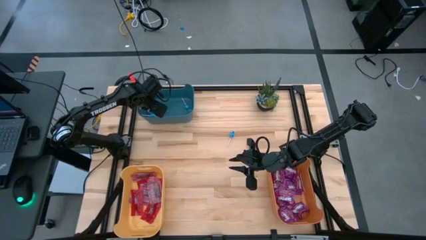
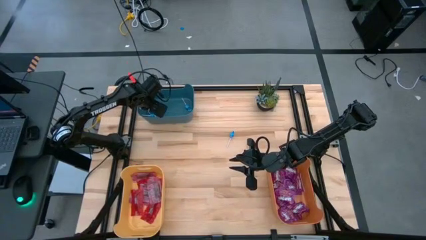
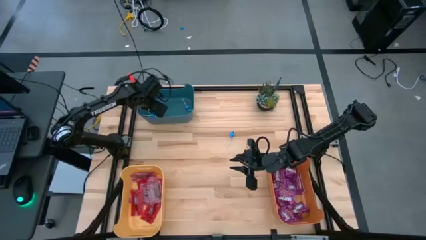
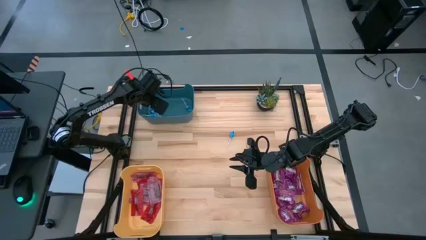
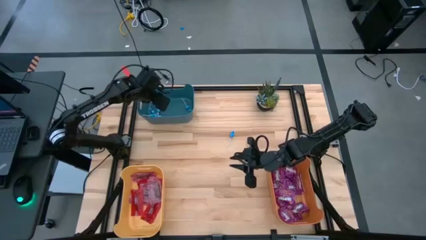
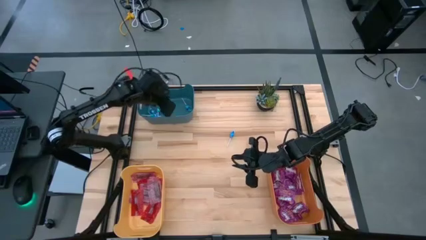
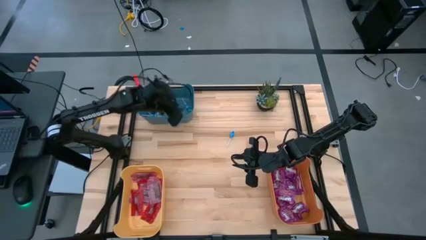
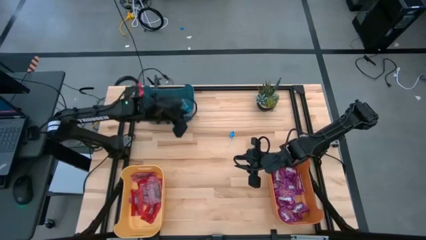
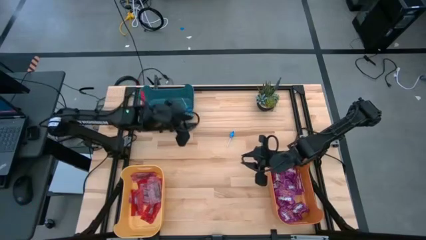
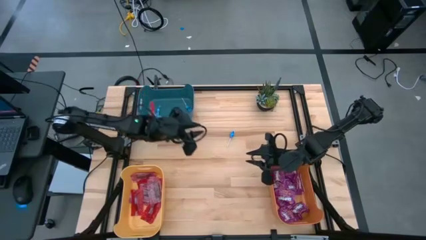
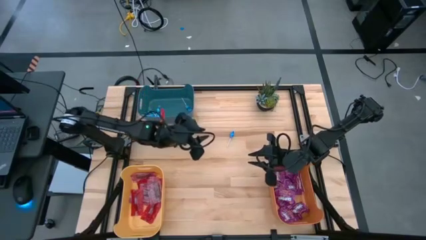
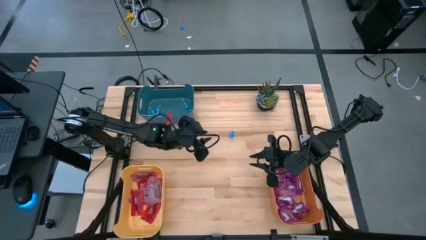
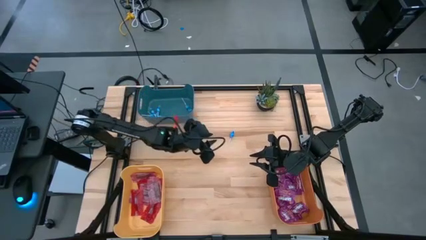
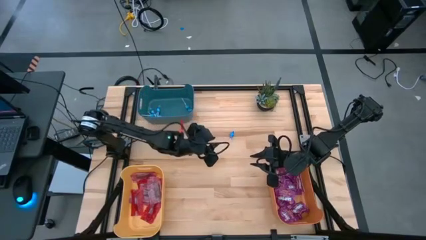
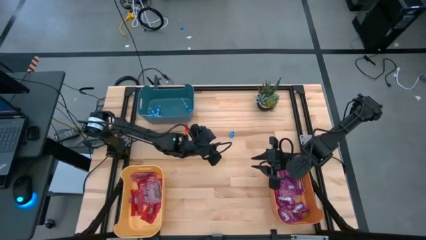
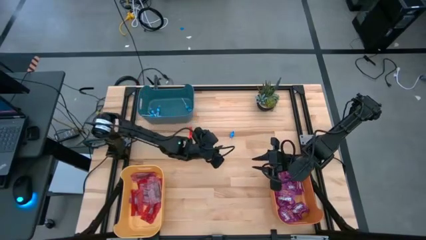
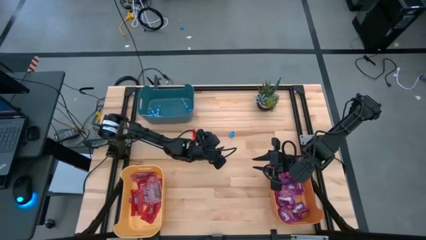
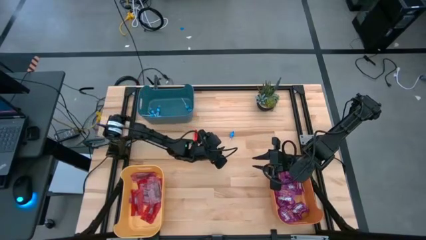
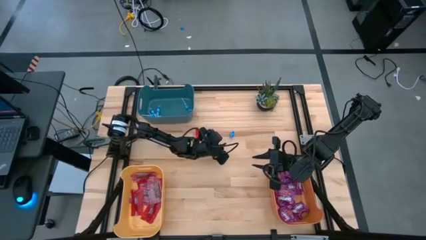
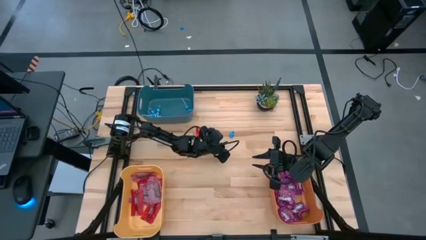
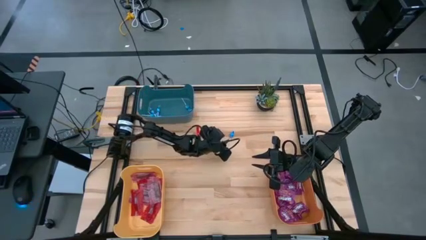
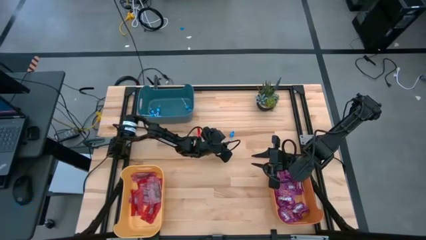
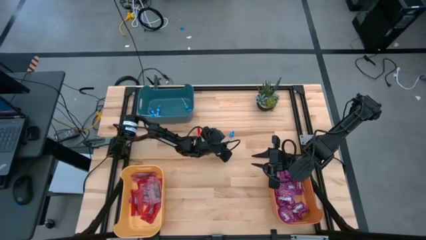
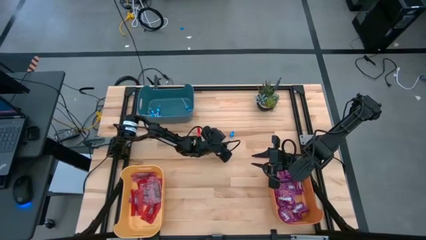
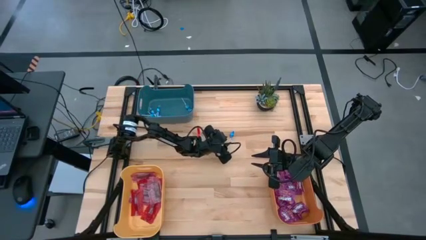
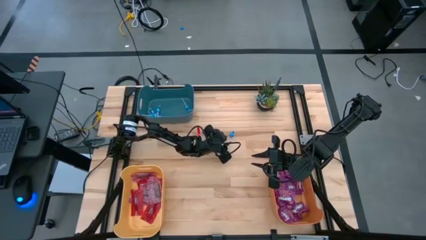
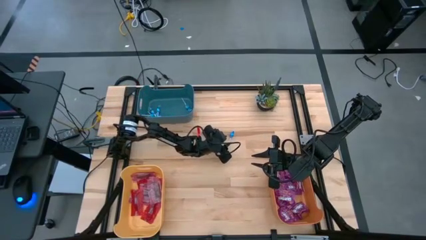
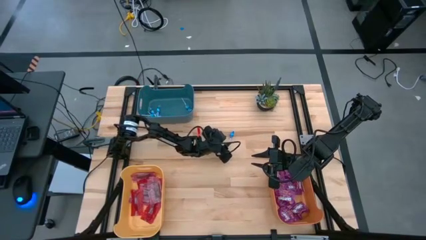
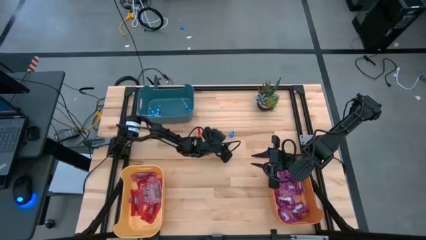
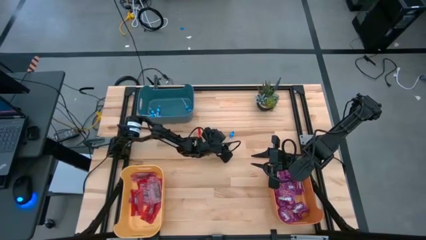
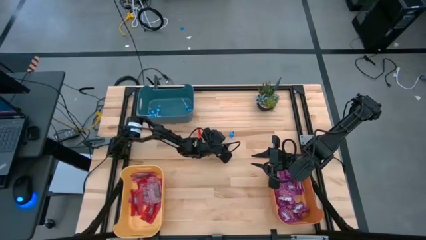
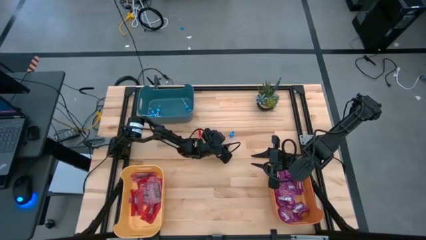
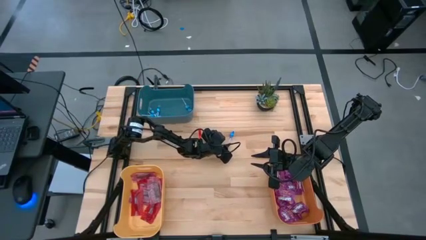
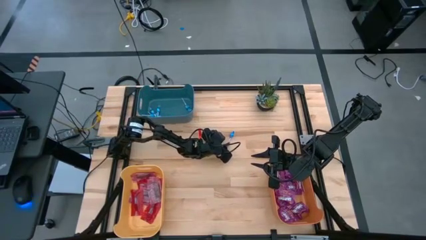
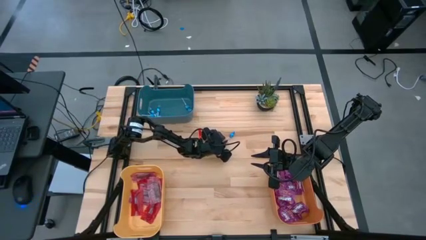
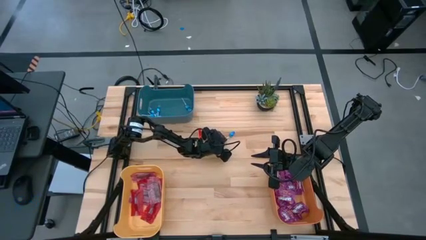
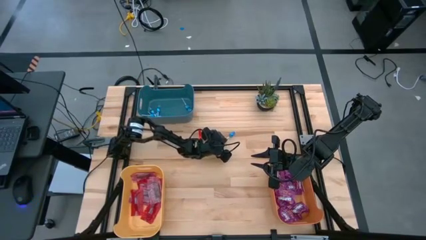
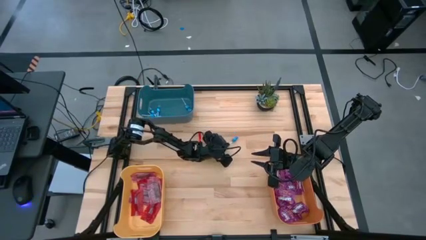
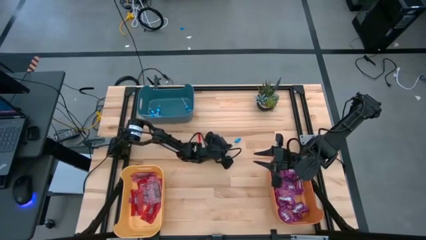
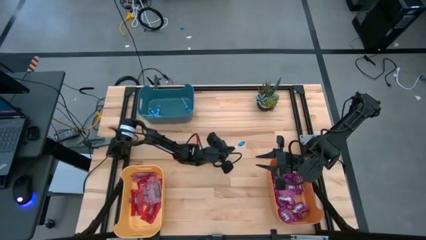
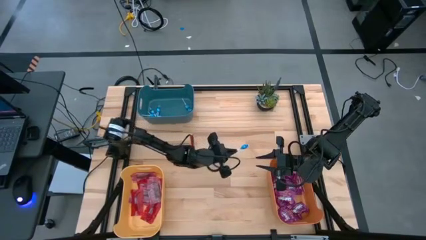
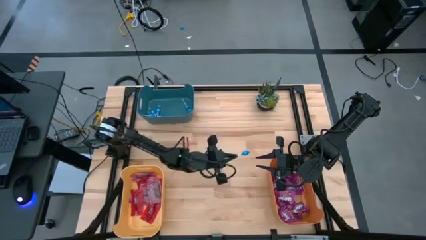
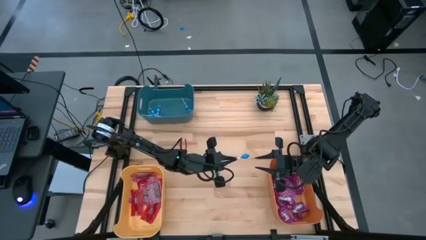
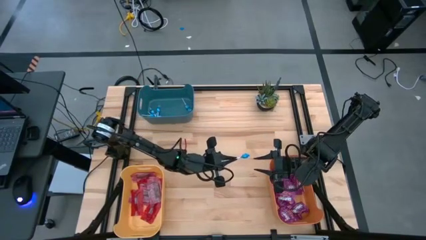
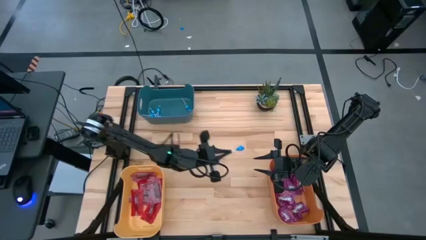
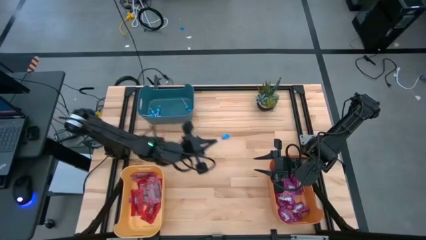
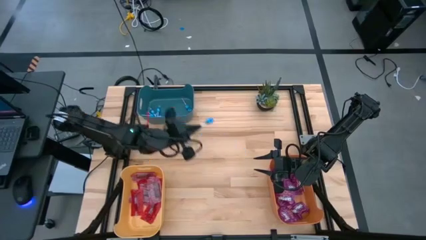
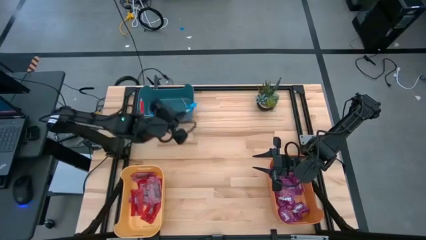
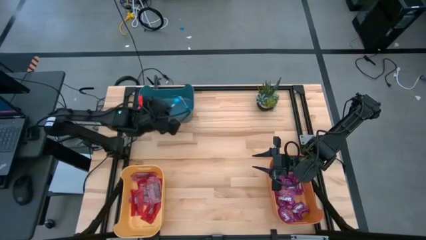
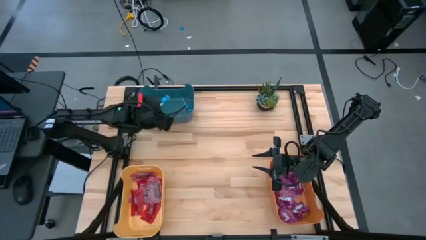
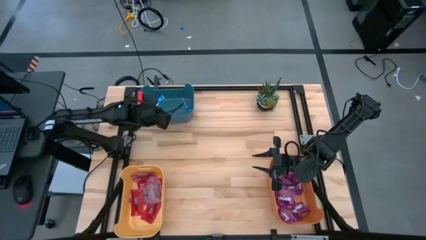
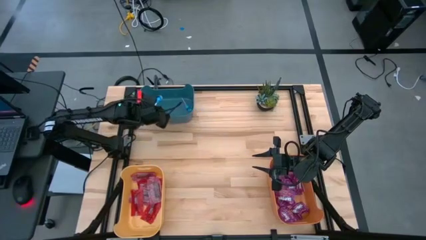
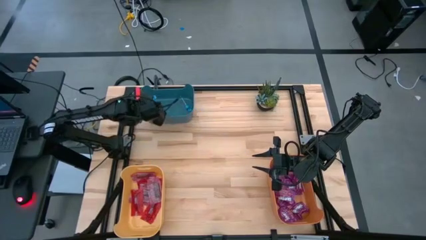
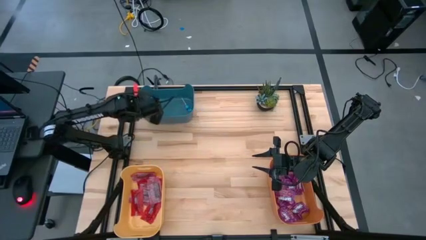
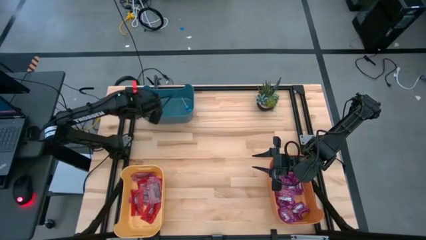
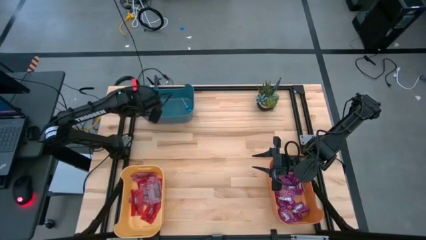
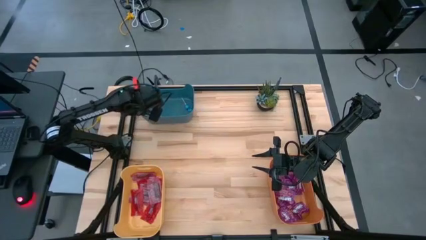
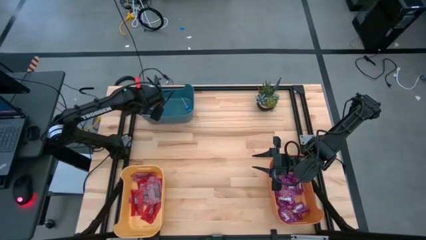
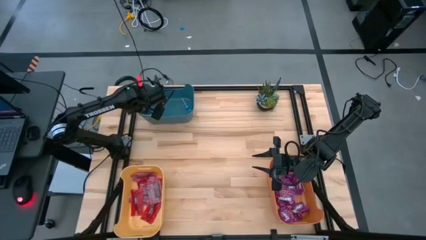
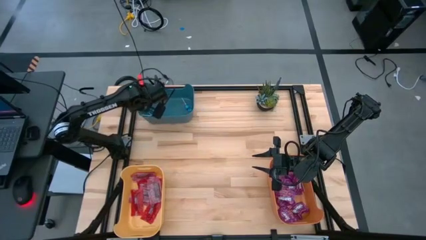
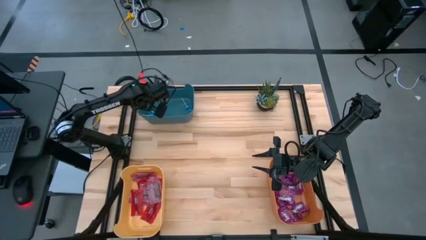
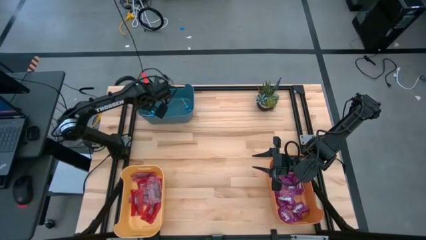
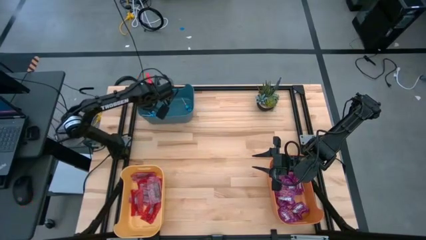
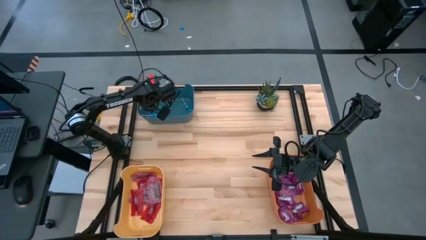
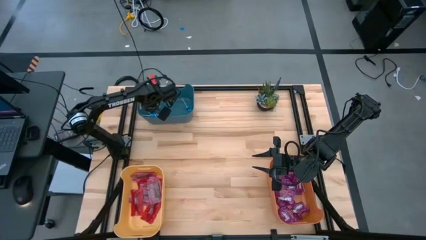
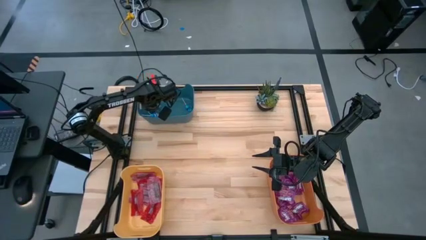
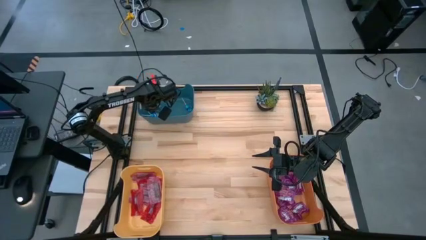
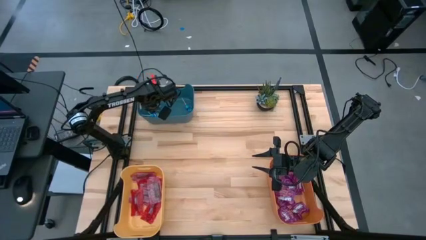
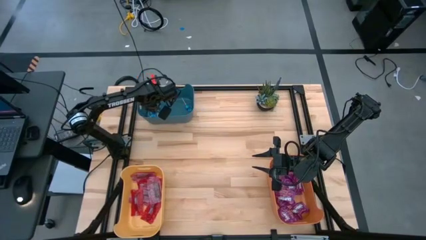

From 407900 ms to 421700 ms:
Task: Sort candy
Put the blue candy into the blue bin

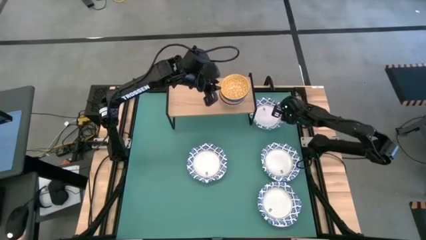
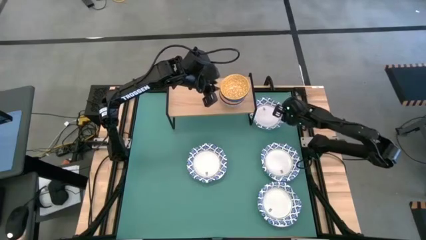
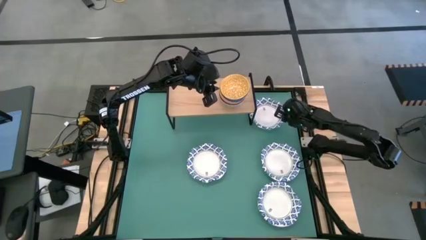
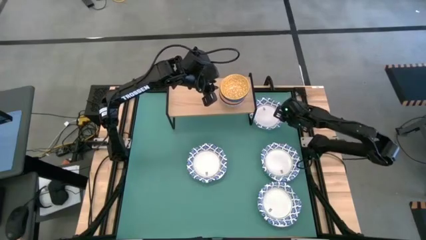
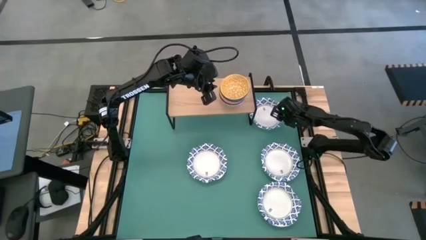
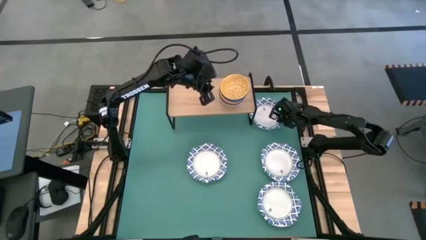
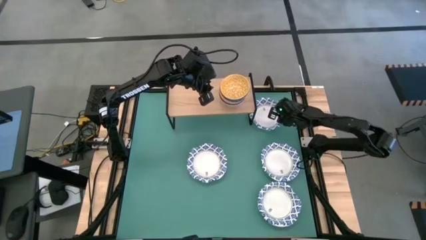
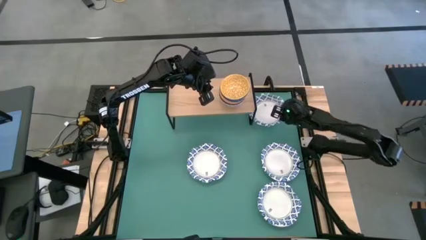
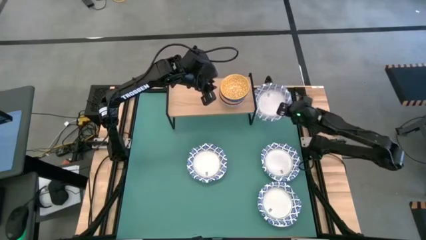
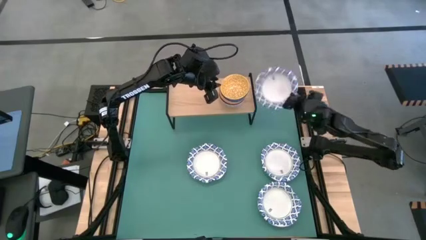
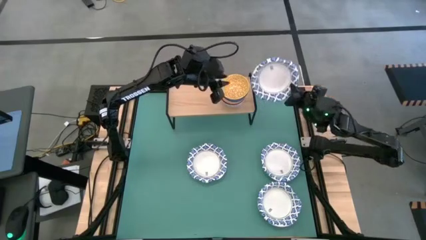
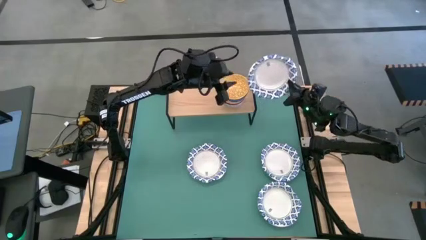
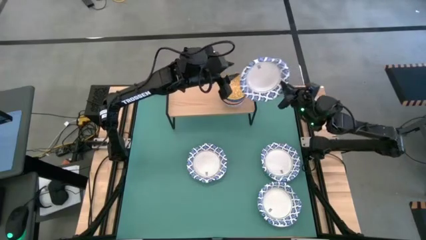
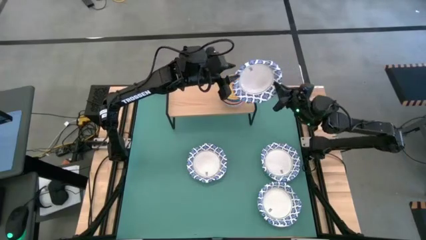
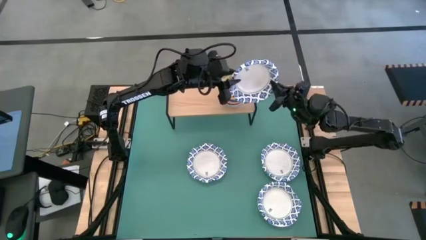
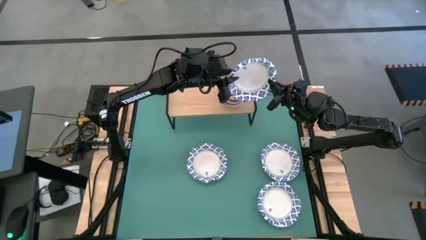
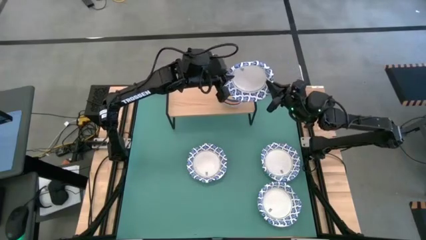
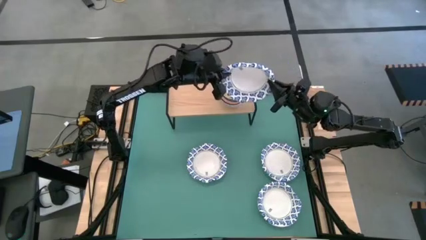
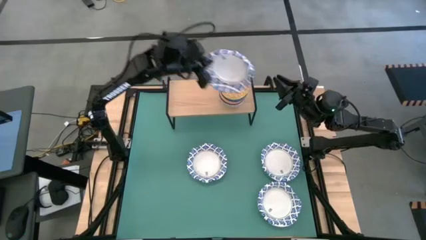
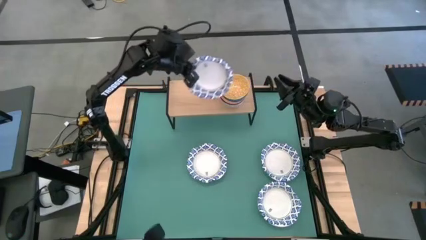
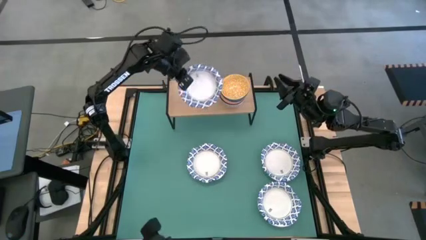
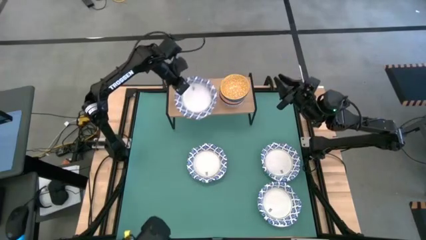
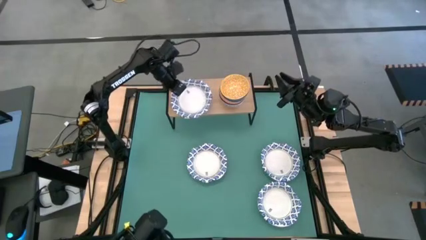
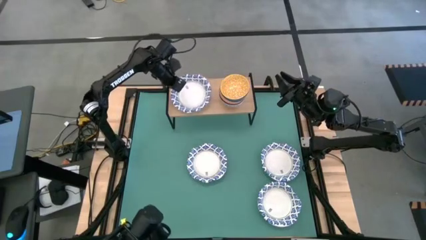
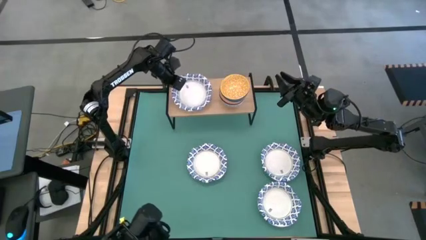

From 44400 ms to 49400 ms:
Task: Place and stack bowls onto a shelf
Put the white bowl on the shelf
